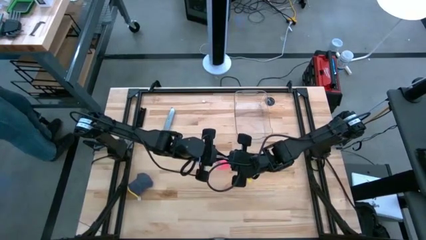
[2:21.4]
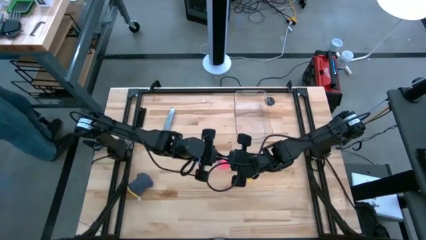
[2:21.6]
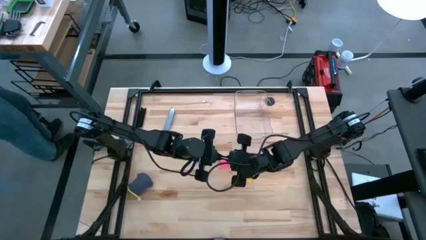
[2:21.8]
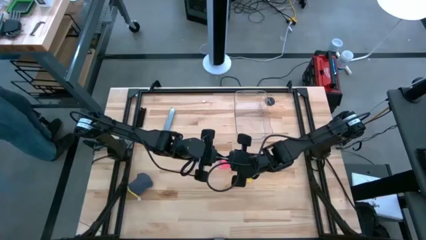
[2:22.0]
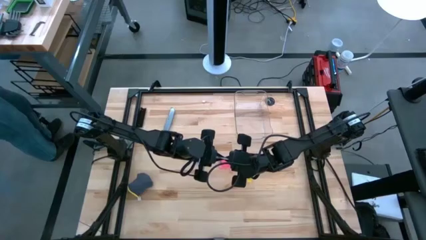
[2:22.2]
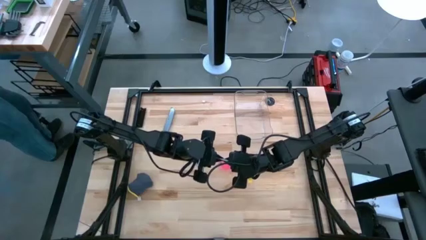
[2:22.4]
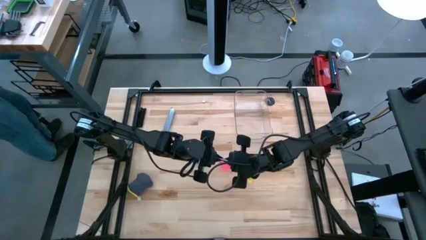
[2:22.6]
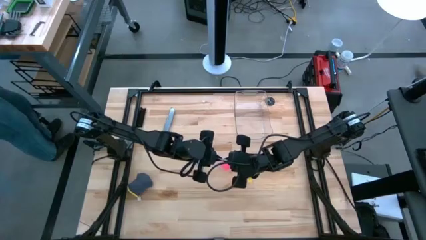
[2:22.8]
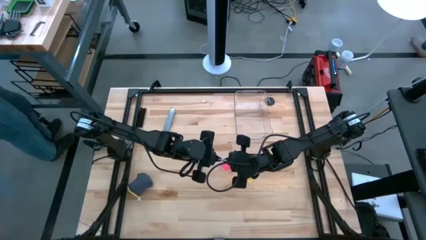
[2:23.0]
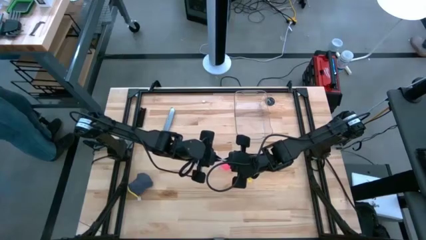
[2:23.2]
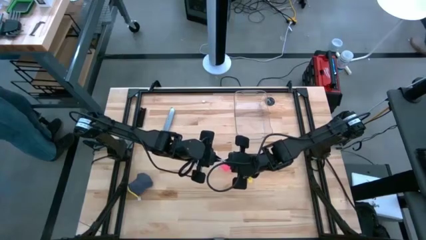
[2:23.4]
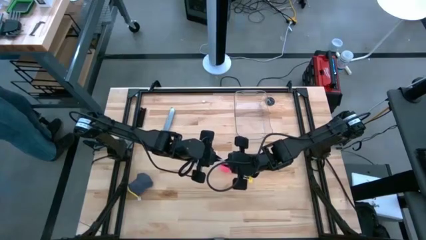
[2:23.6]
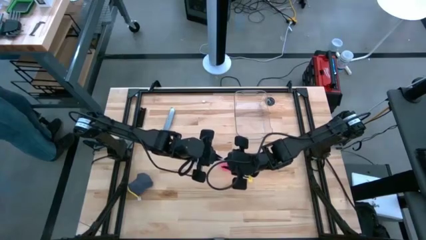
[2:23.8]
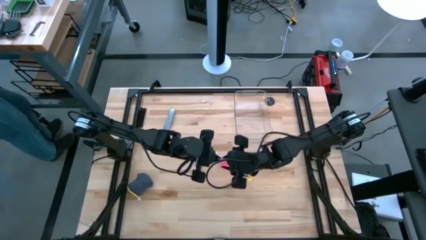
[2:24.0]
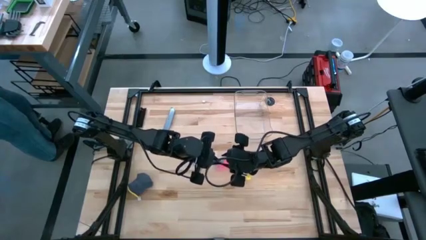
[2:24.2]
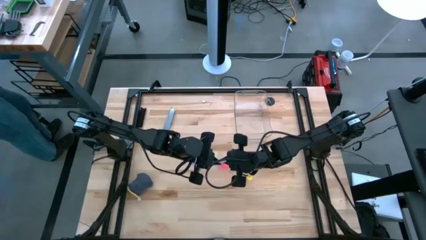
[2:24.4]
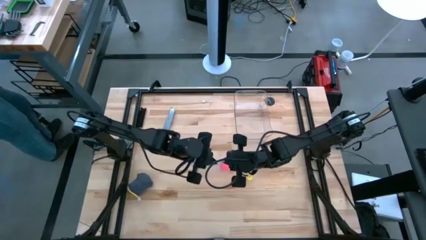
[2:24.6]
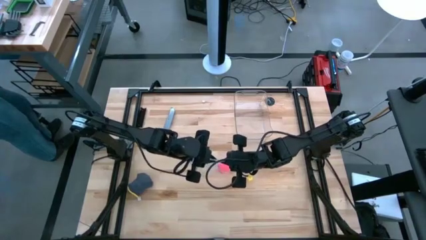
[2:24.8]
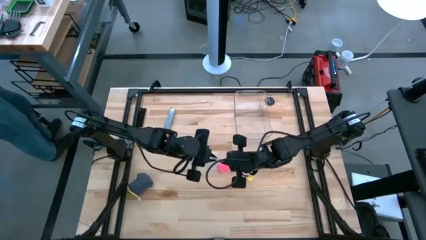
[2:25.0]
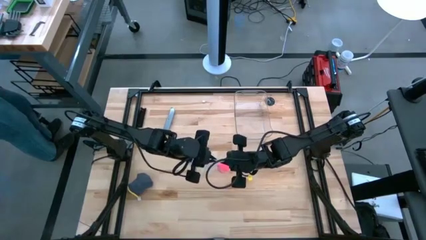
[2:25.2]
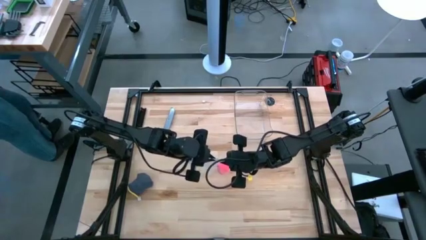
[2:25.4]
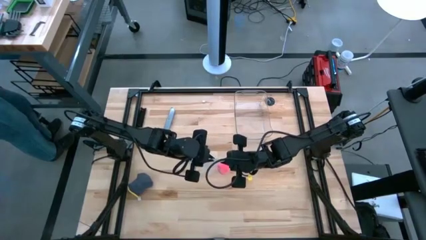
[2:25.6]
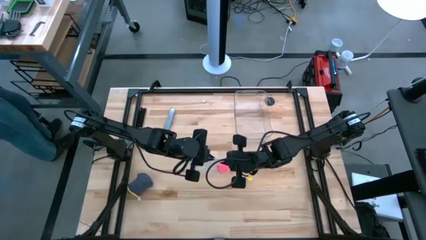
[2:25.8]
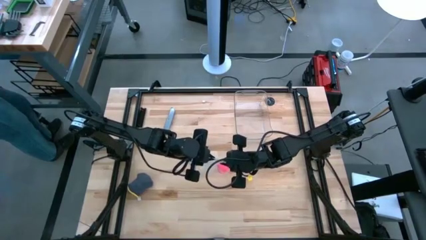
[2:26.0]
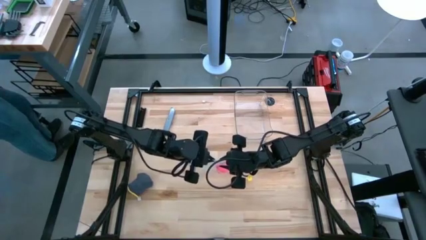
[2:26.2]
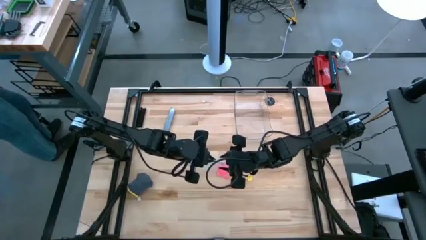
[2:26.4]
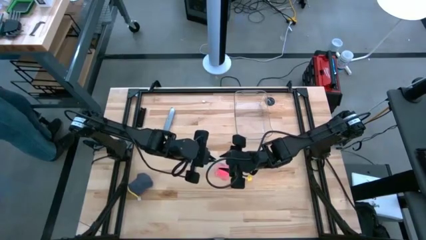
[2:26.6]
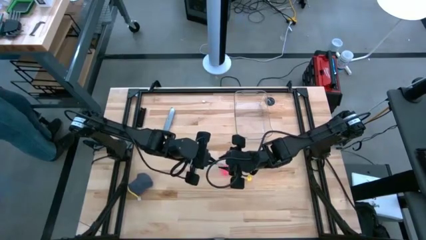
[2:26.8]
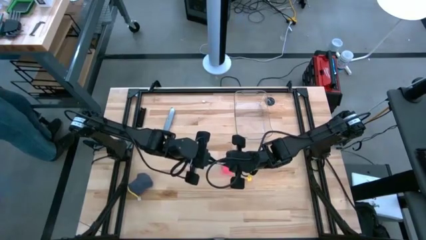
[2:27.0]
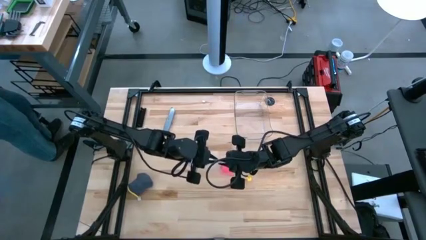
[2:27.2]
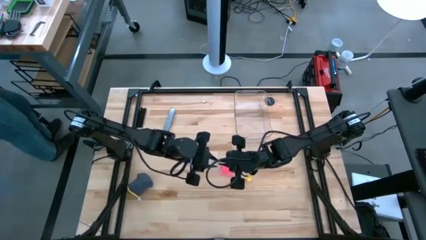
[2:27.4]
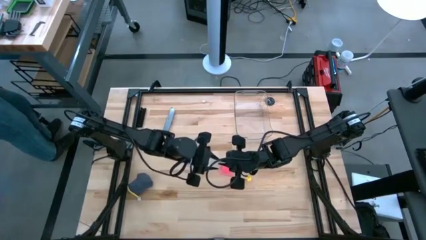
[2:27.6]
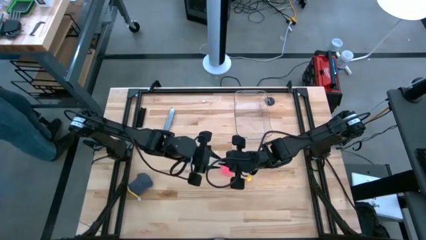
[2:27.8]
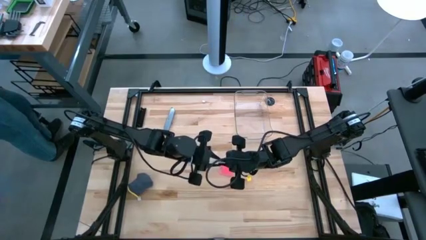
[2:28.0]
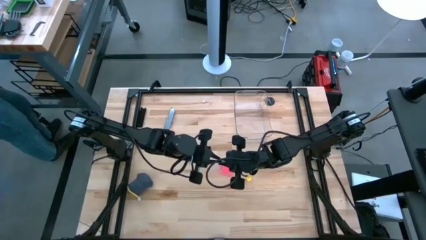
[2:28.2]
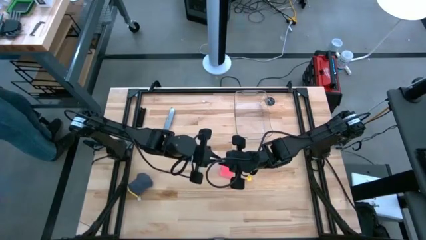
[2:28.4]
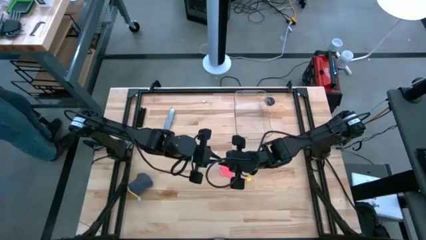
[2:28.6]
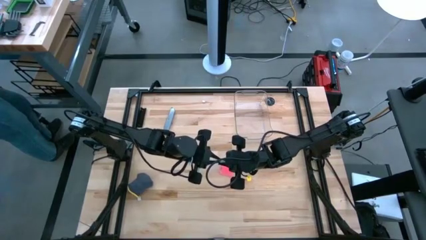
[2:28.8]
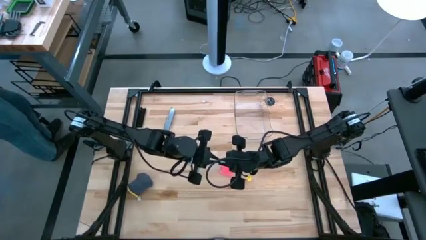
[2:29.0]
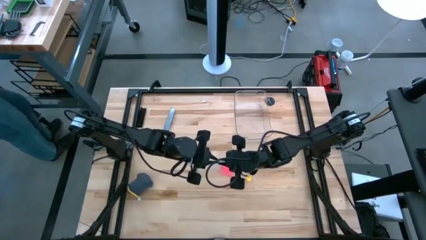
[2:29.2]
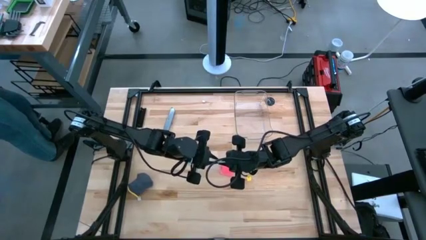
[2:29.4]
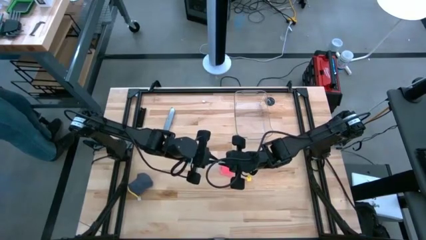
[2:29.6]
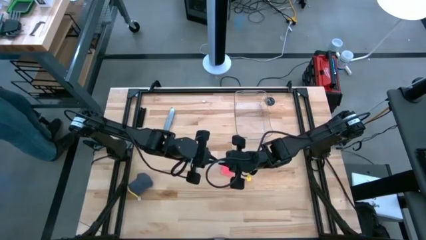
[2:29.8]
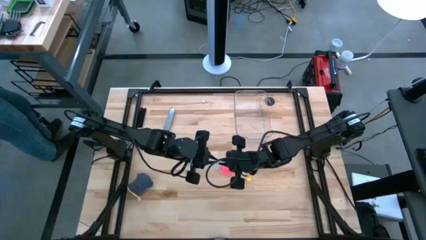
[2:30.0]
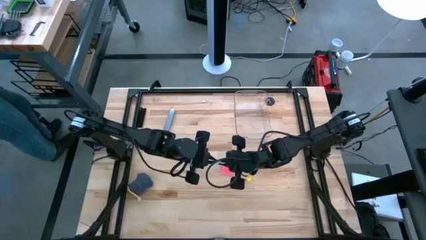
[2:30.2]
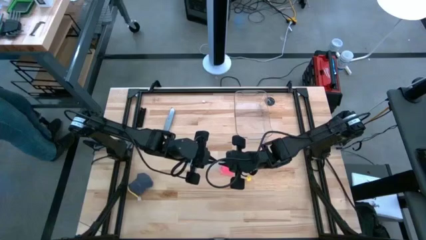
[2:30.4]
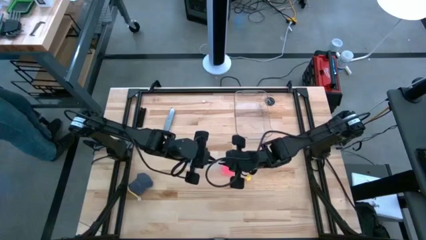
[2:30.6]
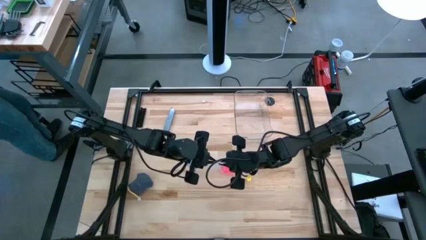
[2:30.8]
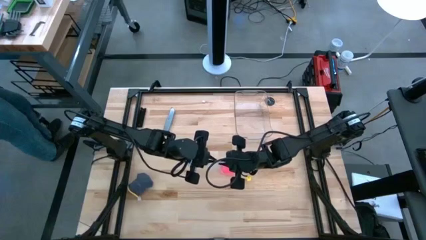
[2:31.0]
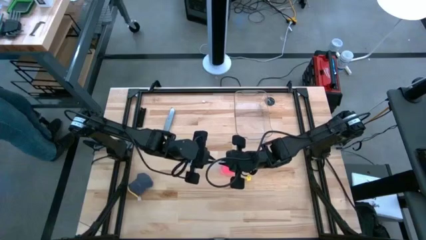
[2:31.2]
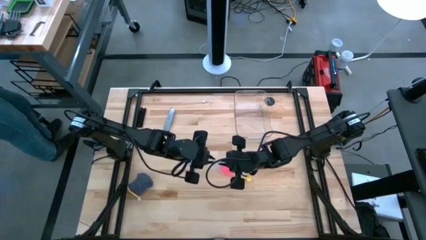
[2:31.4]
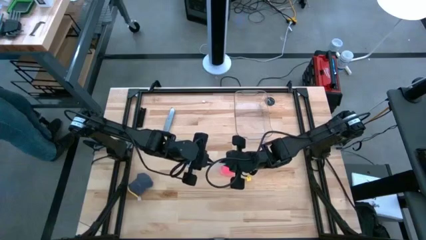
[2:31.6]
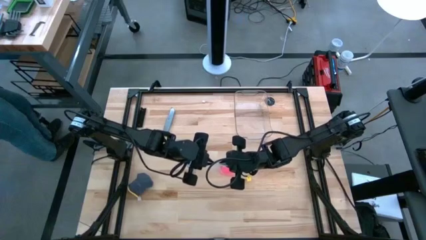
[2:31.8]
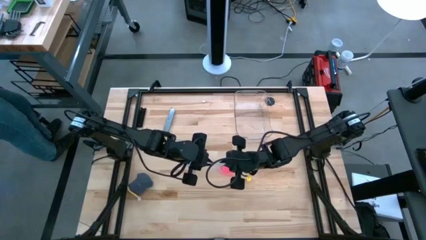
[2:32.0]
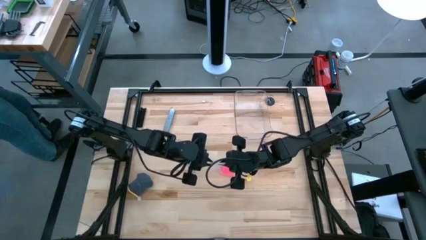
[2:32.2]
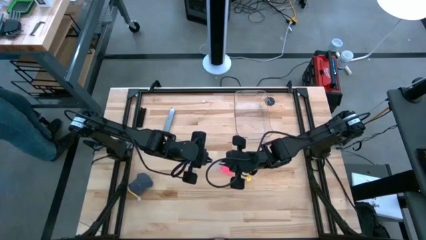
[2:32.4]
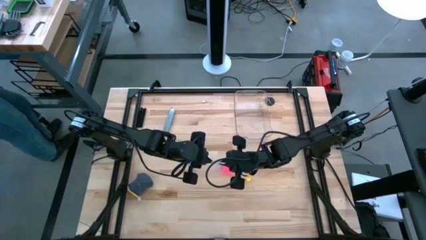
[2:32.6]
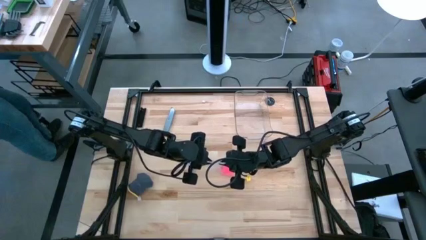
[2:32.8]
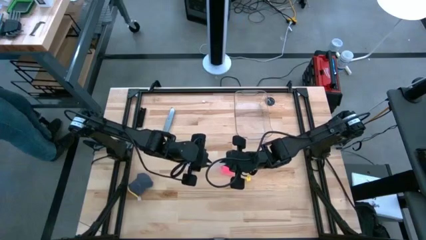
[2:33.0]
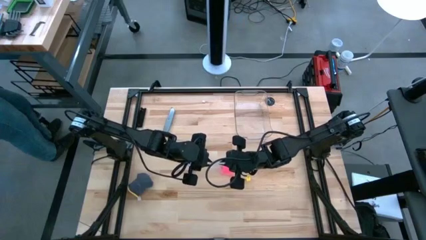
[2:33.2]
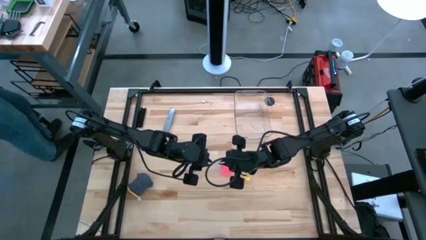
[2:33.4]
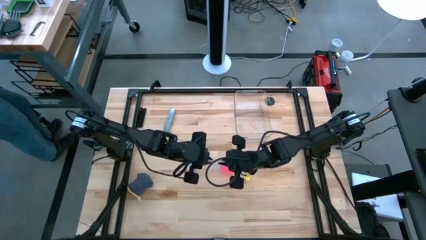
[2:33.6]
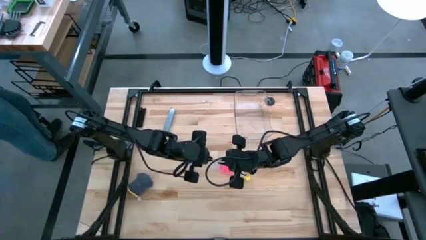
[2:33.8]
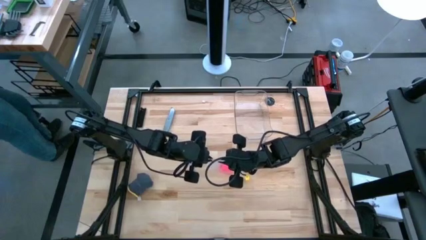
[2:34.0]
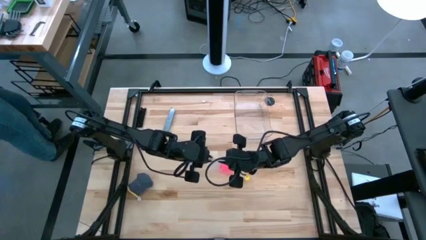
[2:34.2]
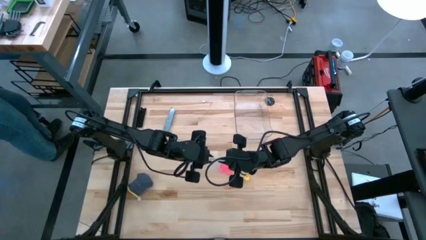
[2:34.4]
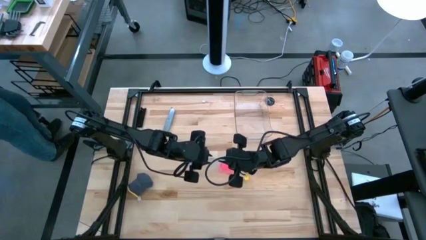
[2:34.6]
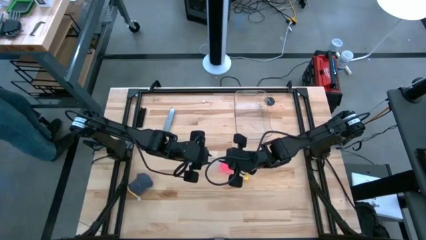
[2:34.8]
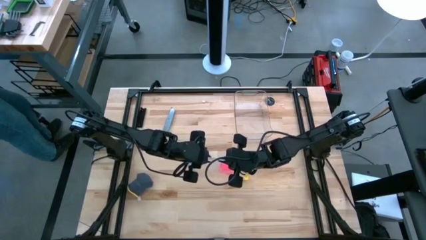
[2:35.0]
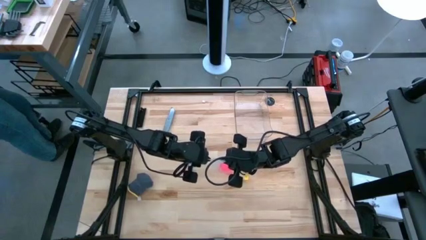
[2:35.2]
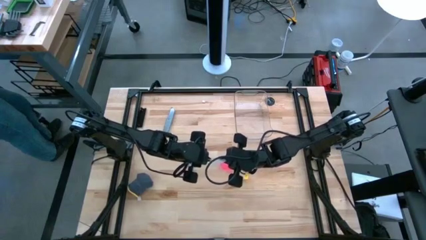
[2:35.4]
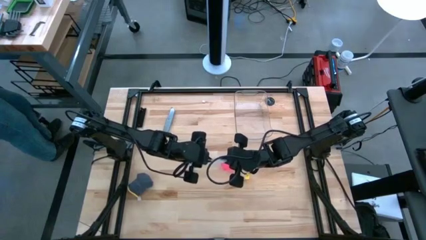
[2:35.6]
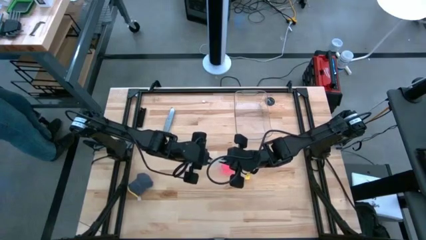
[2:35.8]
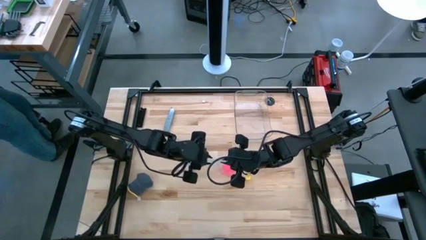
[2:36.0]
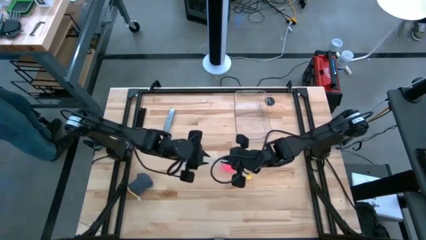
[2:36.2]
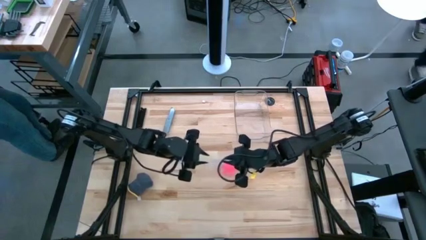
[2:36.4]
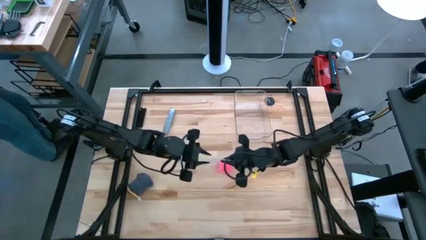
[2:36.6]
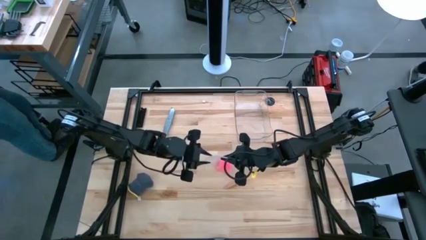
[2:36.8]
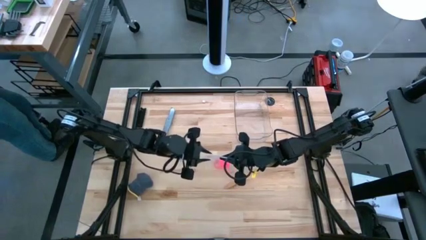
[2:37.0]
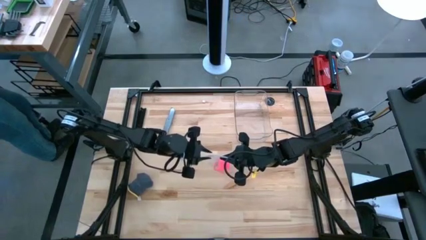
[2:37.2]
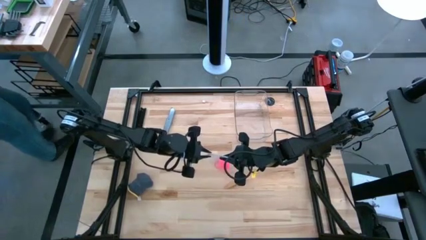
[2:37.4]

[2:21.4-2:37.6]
Task: Roll bandage
Close the transparent zip bag
